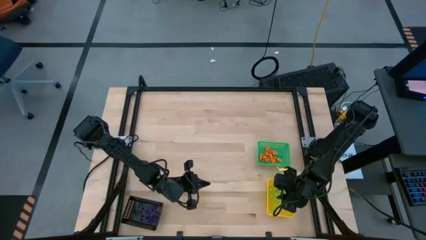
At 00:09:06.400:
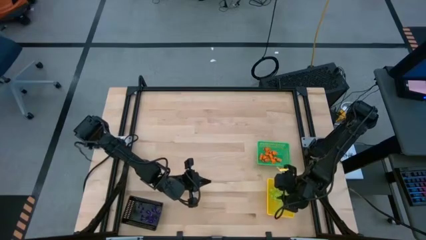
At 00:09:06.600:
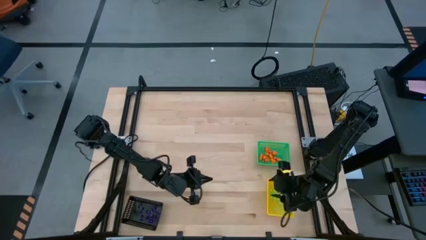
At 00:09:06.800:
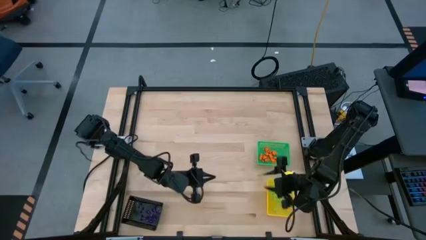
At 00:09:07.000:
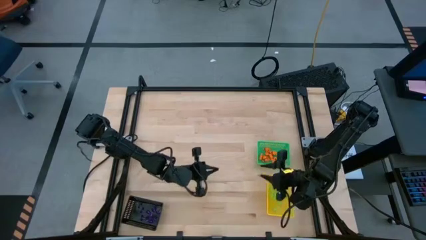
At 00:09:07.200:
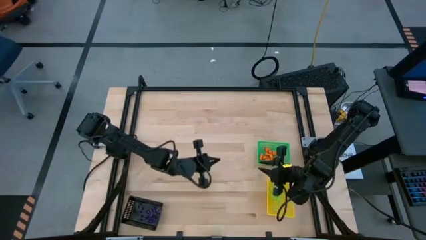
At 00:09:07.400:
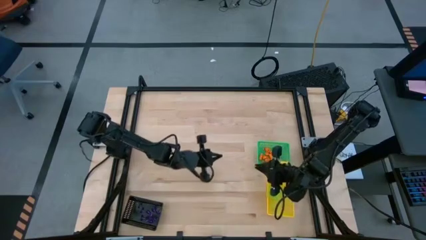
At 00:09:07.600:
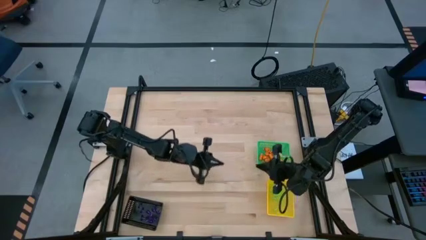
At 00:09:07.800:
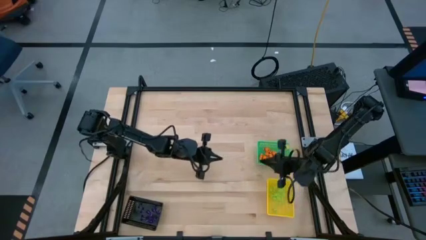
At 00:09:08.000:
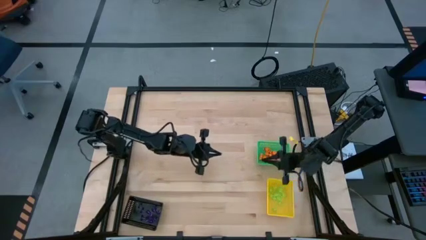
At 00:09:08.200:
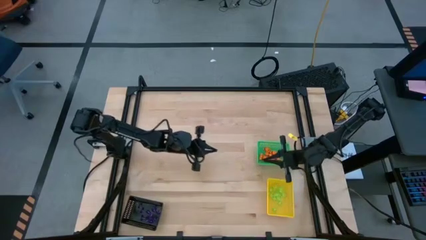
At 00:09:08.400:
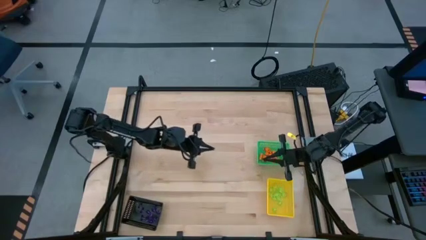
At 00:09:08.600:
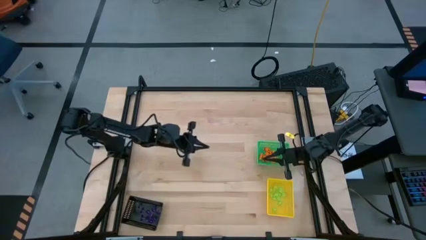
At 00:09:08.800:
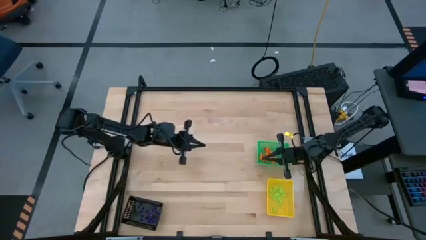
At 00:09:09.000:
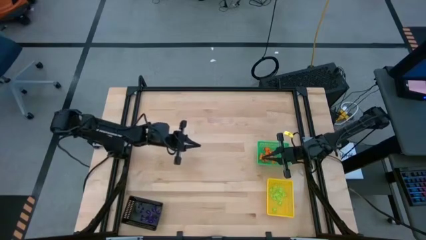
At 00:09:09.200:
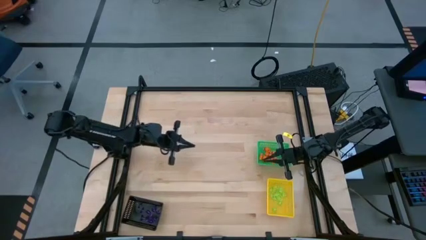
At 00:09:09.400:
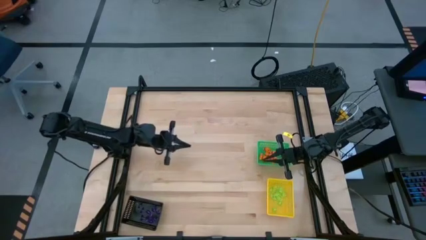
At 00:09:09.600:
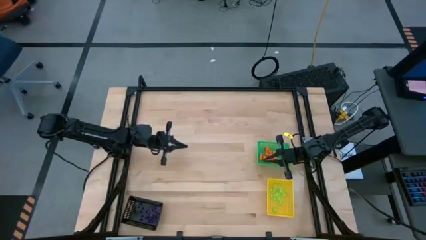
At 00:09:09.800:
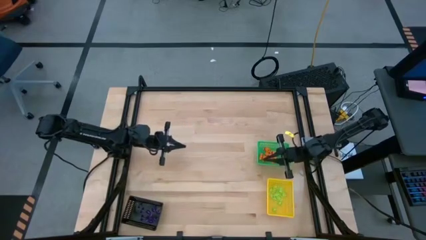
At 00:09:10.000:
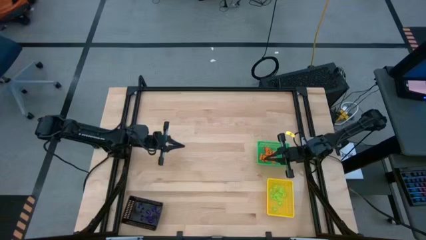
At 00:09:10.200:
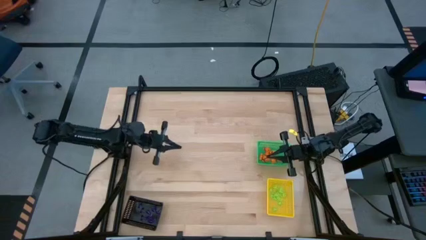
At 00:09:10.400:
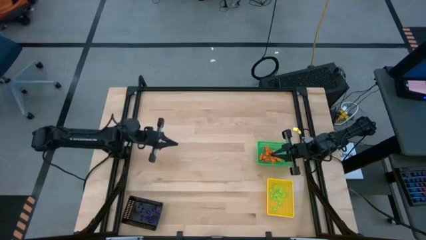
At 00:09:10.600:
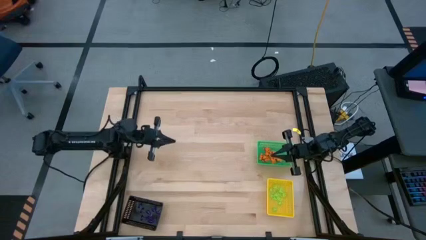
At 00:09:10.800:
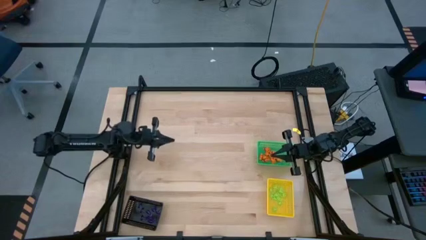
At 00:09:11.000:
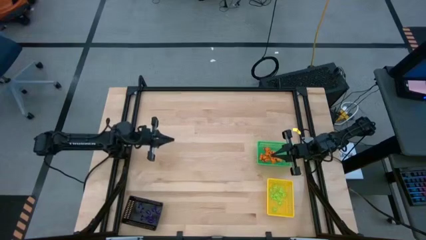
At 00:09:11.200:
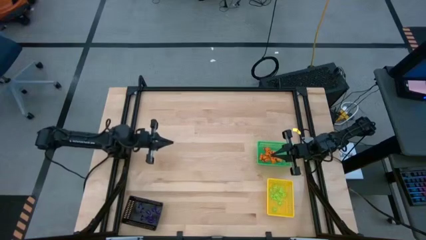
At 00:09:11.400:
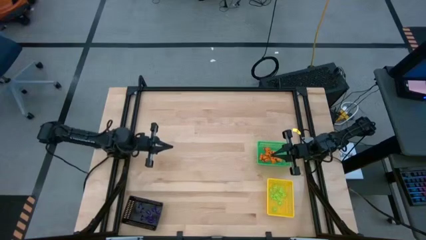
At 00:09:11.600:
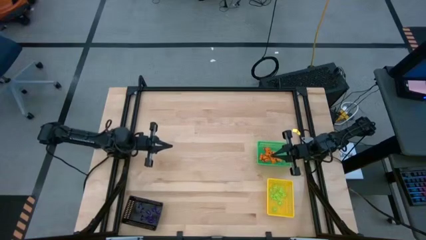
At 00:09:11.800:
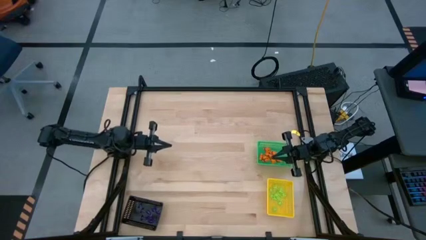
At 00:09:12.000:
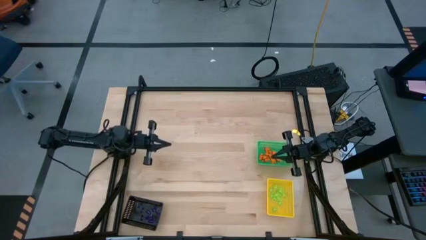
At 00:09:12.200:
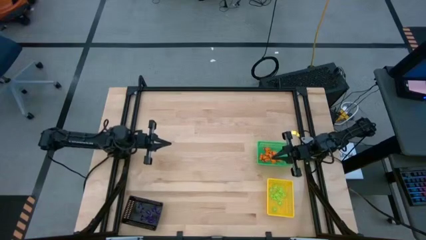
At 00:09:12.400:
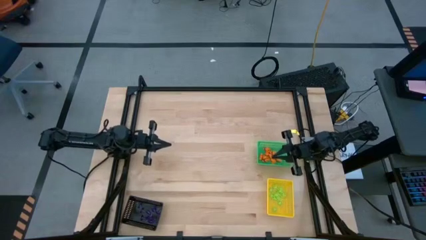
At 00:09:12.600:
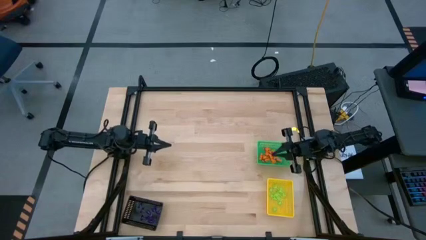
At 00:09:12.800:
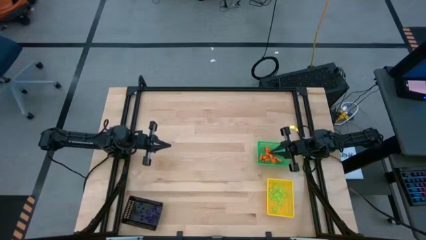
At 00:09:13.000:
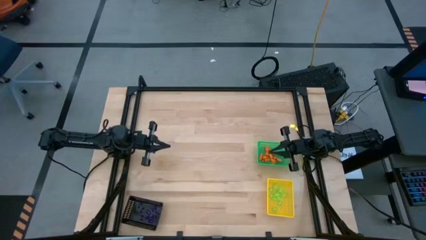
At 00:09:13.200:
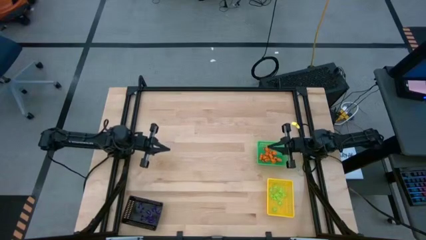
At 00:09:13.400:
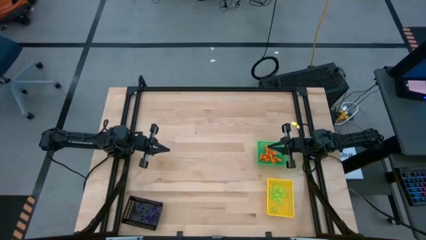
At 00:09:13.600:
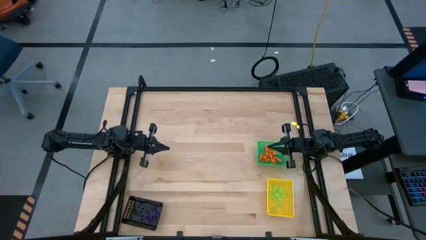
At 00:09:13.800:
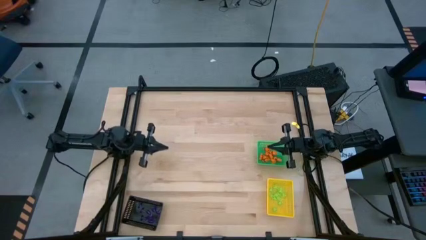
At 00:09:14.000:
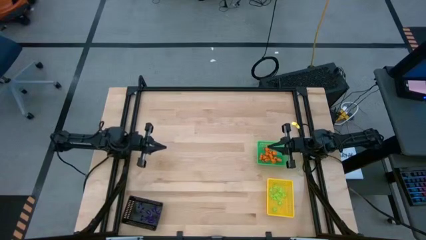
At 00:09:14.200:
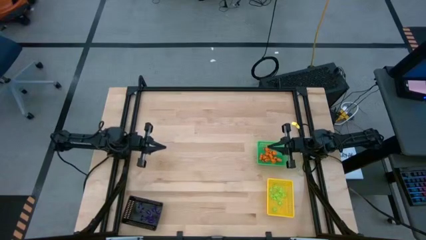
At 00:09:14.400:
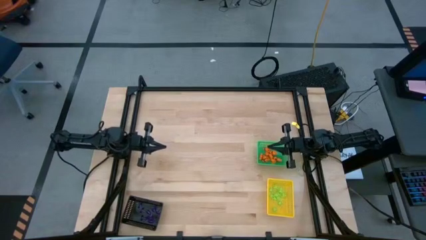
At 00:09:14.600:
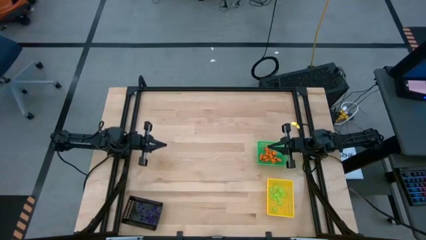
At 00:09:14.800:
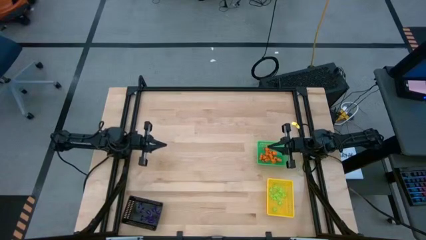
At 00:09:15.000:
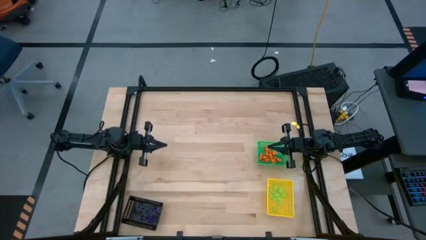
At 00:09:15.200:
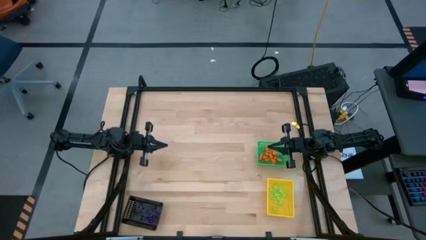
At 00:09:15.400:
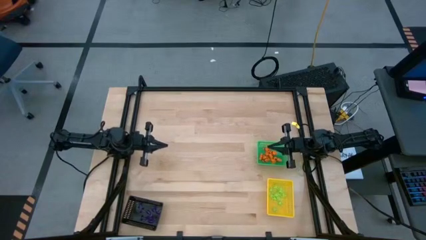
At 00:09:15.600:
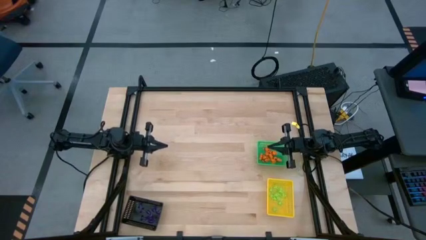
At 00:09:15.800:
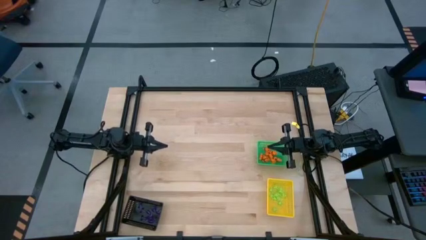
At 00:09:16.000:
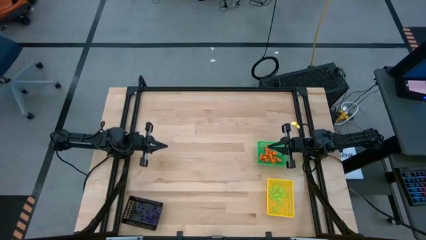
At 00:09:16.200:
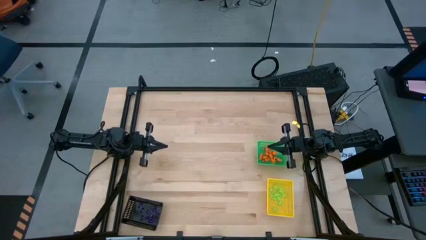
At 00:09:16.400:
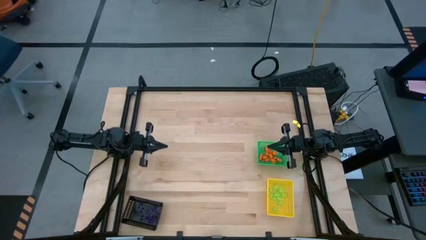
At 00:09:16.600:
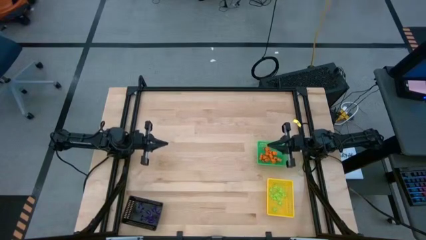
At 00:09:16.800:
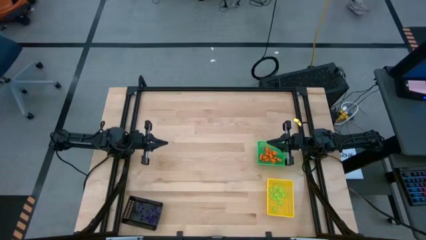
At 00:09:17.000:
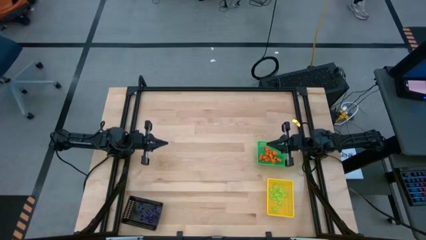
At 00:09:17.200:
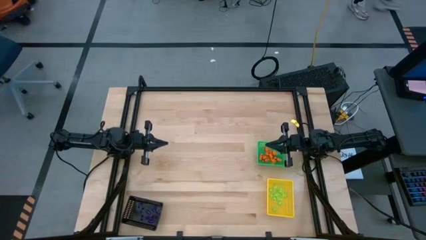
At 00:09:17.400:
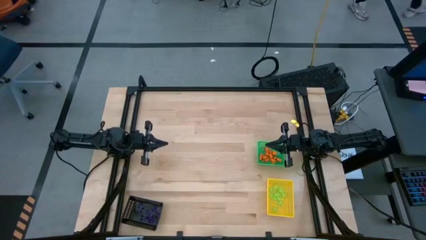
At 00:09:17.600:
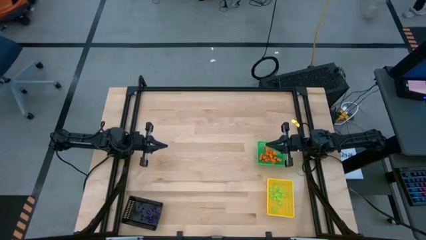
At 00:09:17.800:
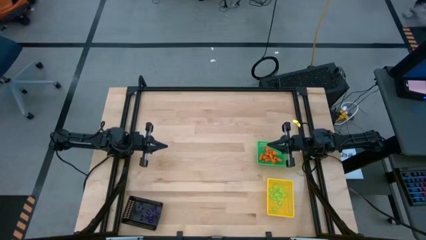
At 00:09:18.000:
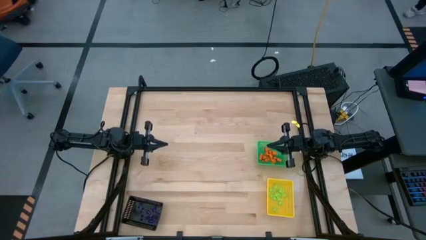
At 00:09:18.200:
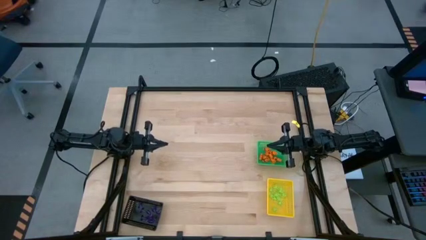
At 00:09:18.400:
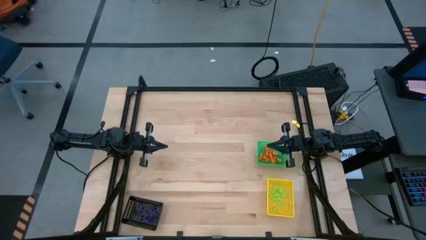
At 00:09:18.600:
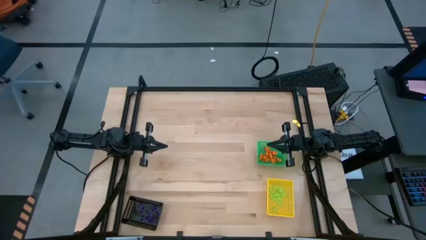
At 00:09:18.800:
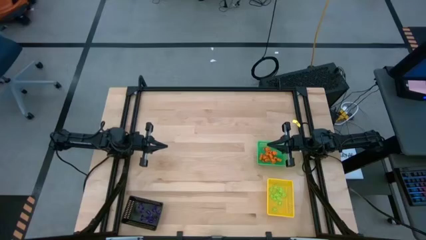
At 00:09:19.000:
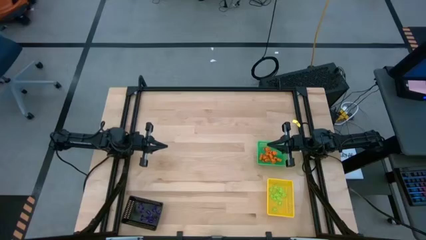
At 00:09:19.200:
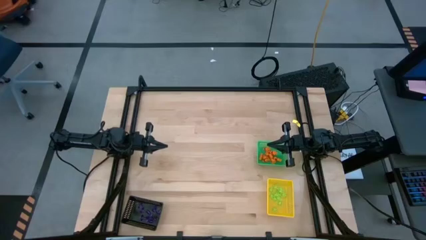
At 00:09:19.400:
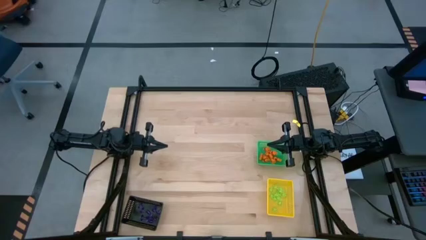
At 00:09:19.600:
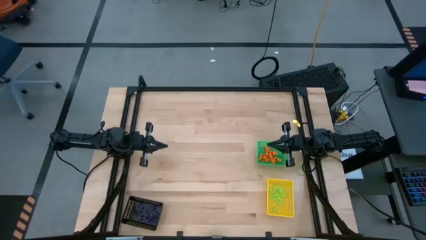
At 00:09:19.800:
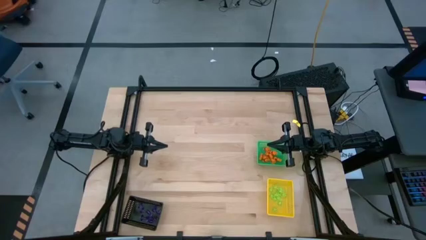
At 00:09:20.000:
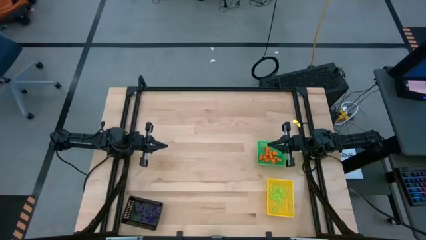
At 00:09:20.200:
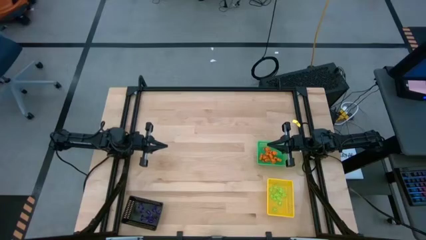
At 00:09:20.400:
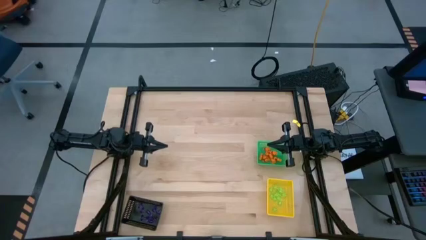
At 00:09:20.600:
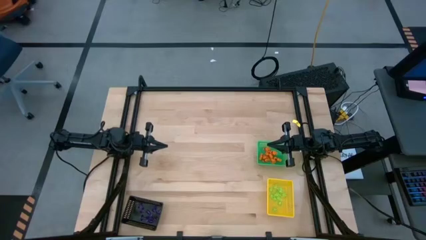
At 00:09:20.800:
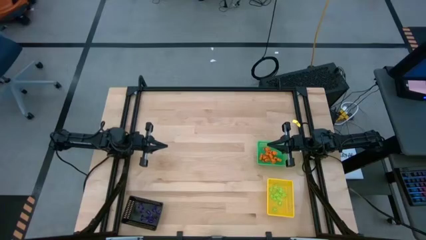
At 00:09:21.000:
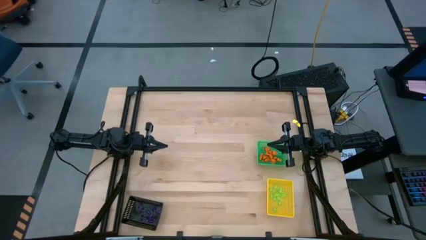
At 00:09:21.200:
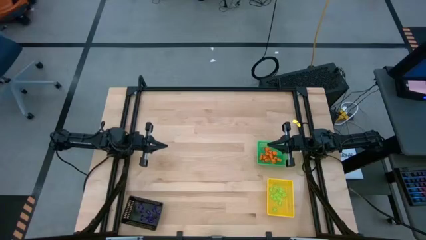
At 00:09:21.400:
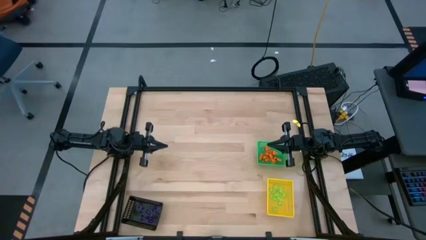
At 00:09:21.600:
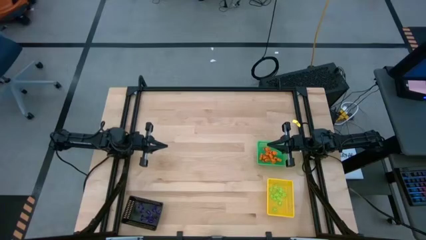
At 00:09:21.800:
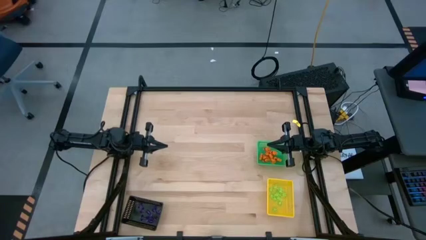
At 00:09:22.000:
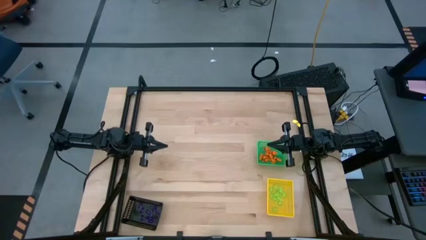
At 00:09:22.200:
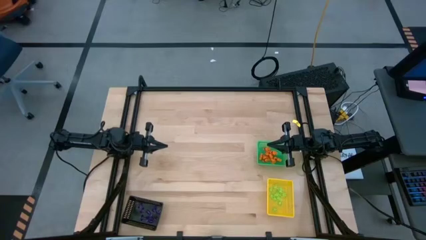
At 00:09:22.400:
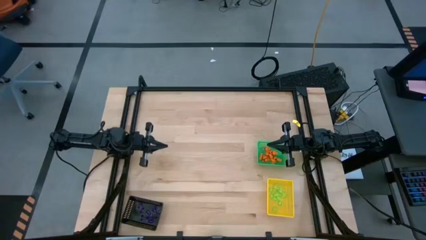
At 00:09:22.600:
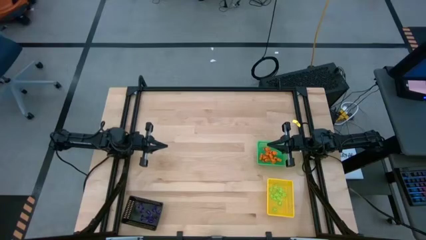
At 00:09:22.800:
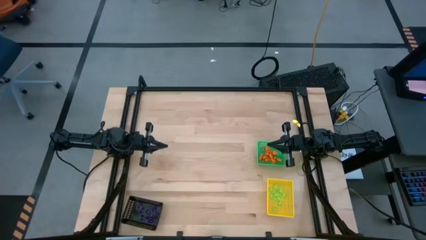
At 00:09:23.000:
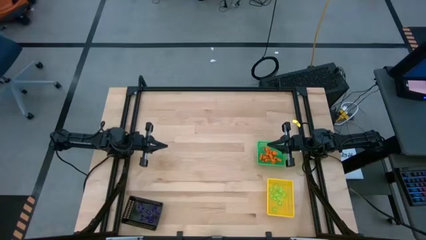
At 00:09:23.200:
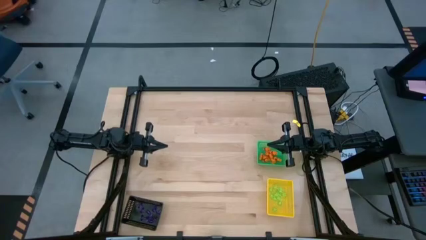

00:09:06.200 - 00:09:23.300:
Task: Sort Halloween decoration
Return to Home Position
